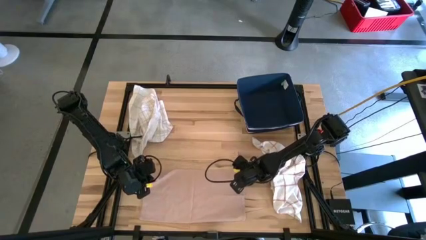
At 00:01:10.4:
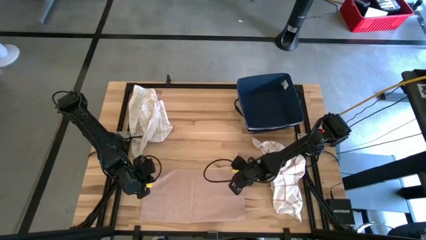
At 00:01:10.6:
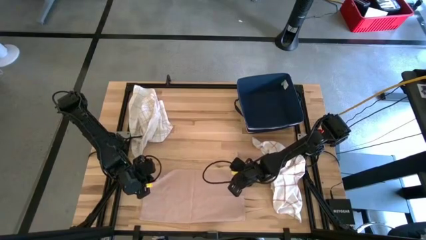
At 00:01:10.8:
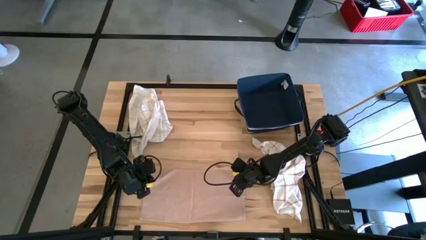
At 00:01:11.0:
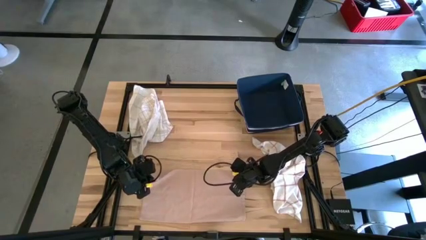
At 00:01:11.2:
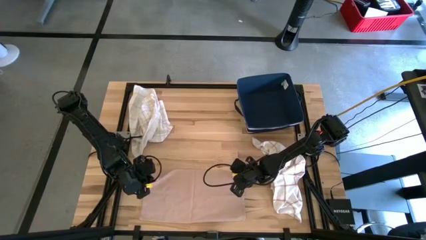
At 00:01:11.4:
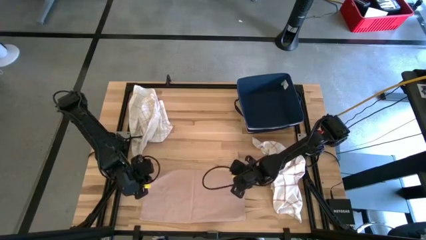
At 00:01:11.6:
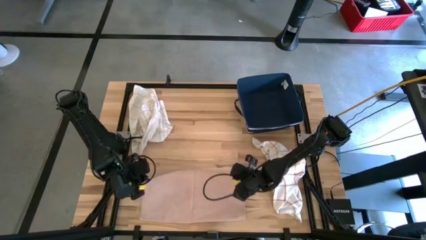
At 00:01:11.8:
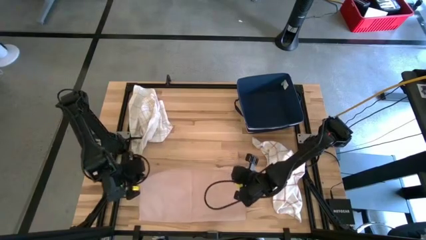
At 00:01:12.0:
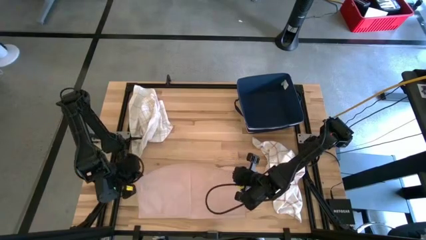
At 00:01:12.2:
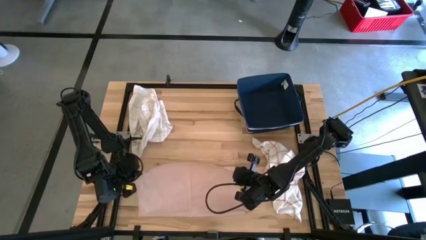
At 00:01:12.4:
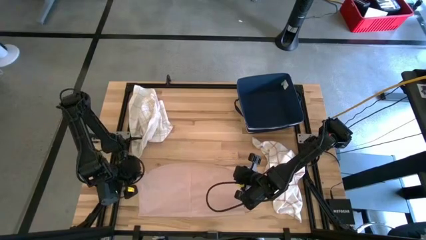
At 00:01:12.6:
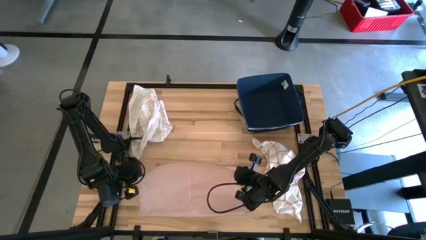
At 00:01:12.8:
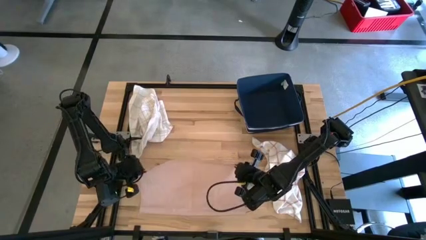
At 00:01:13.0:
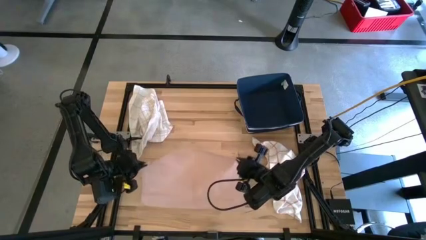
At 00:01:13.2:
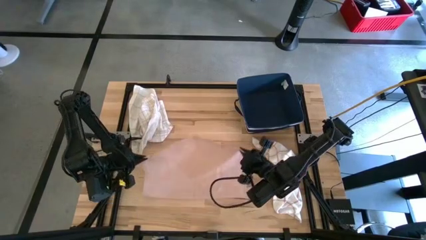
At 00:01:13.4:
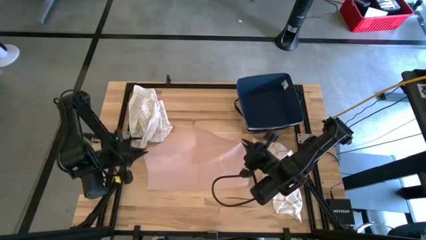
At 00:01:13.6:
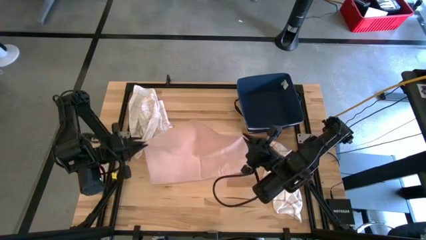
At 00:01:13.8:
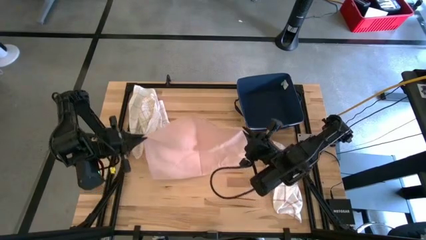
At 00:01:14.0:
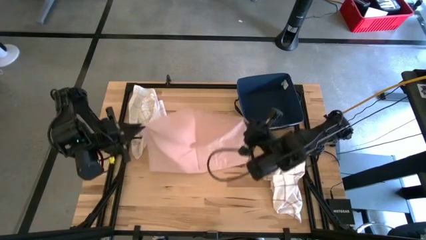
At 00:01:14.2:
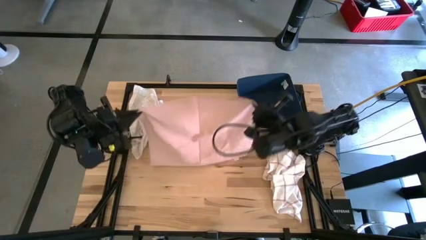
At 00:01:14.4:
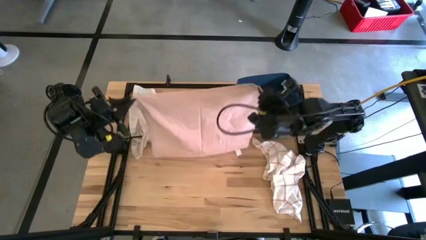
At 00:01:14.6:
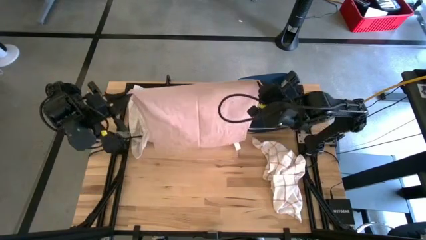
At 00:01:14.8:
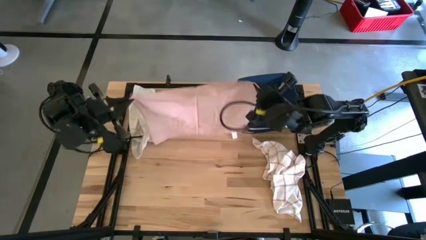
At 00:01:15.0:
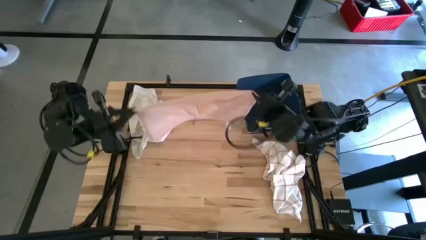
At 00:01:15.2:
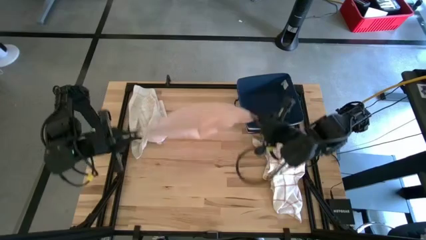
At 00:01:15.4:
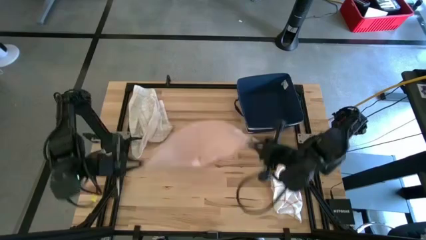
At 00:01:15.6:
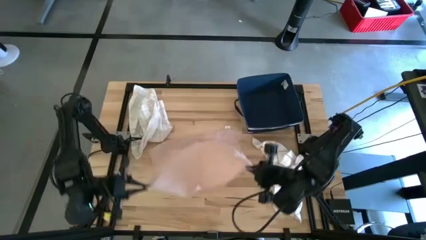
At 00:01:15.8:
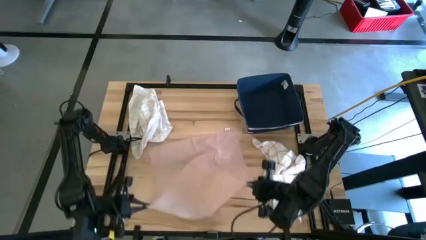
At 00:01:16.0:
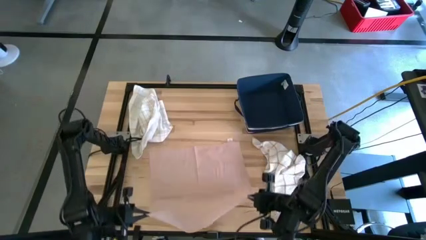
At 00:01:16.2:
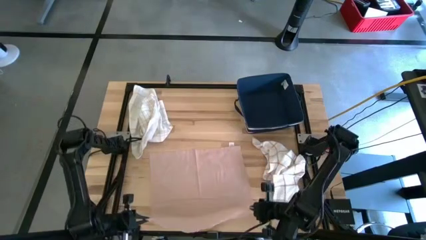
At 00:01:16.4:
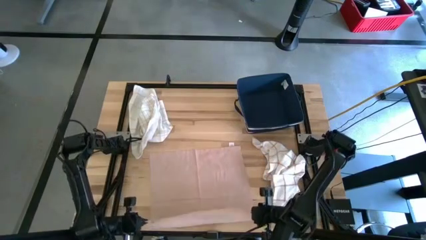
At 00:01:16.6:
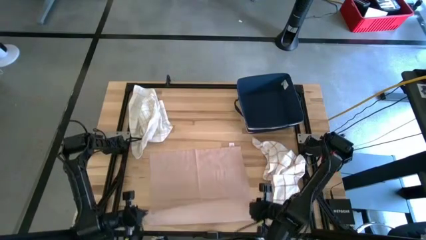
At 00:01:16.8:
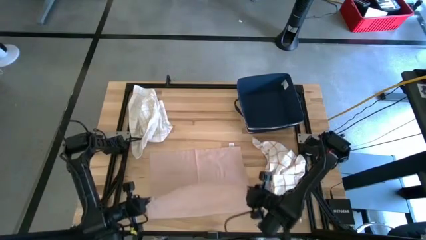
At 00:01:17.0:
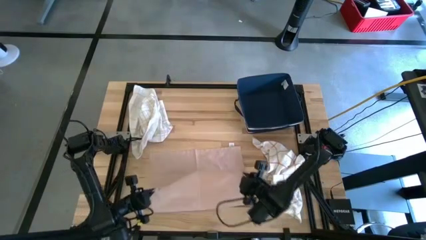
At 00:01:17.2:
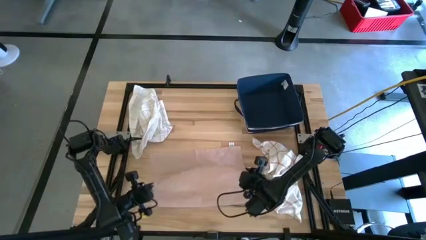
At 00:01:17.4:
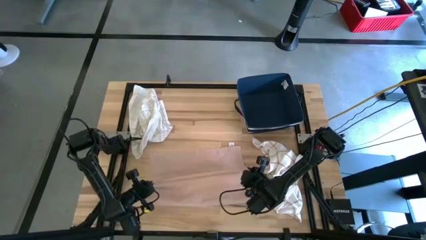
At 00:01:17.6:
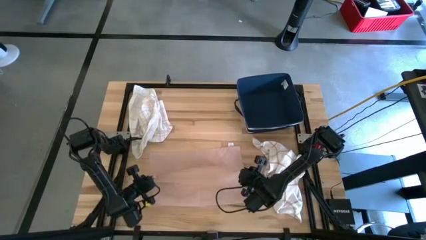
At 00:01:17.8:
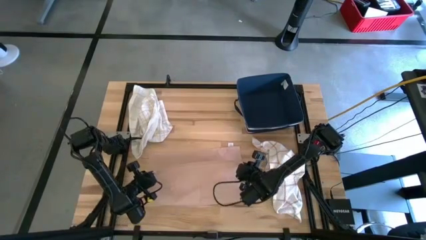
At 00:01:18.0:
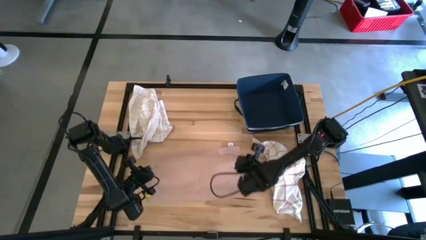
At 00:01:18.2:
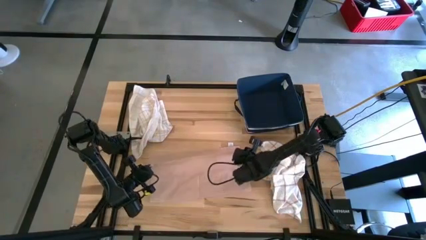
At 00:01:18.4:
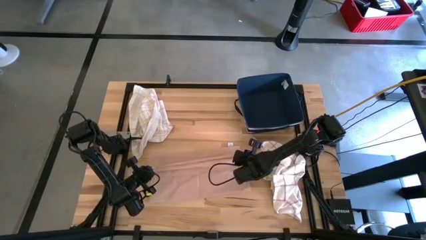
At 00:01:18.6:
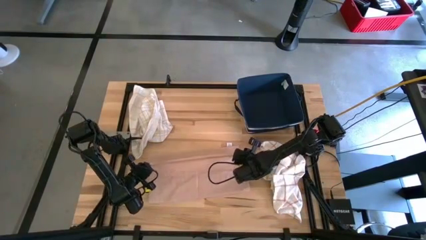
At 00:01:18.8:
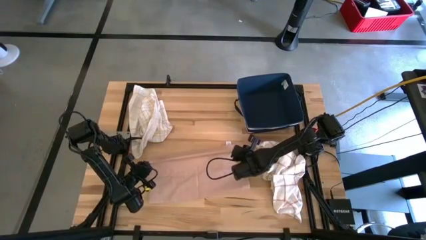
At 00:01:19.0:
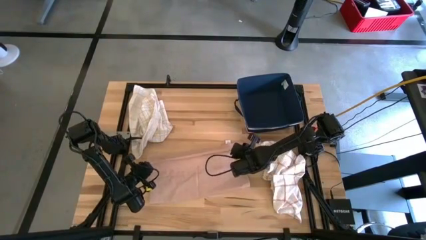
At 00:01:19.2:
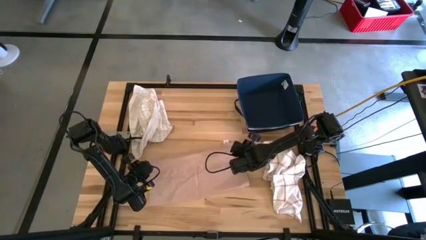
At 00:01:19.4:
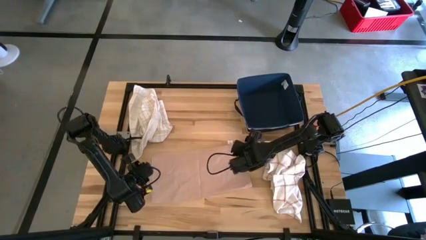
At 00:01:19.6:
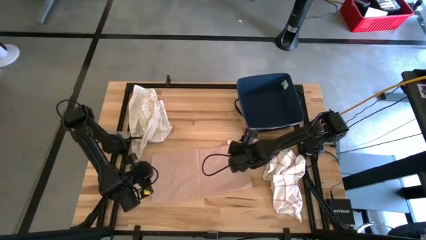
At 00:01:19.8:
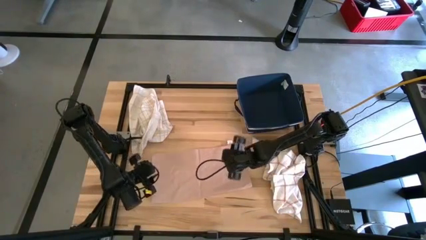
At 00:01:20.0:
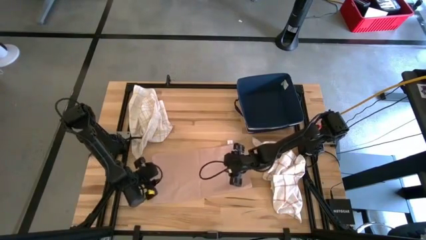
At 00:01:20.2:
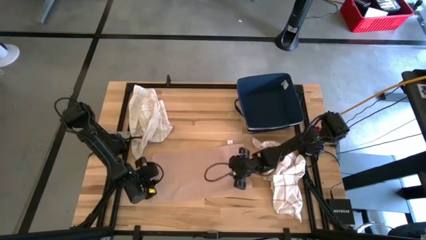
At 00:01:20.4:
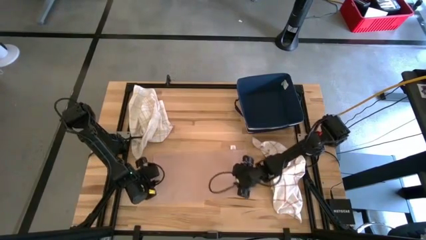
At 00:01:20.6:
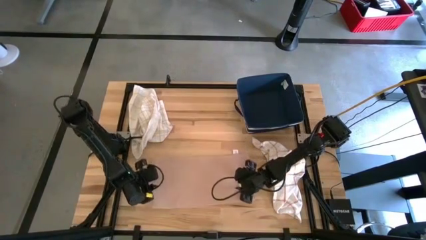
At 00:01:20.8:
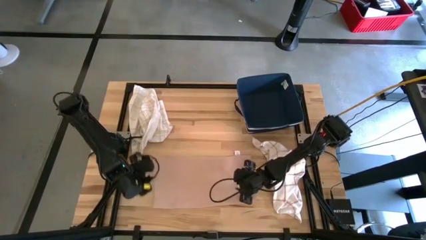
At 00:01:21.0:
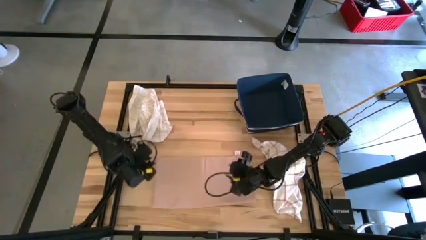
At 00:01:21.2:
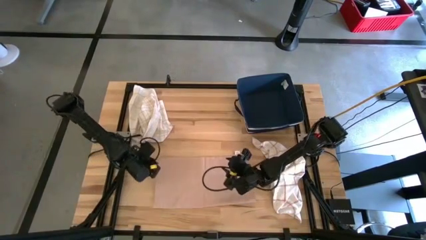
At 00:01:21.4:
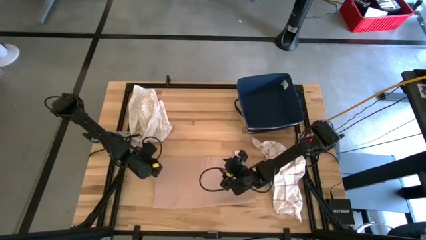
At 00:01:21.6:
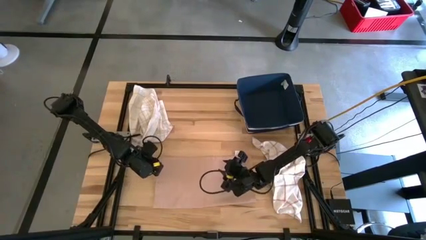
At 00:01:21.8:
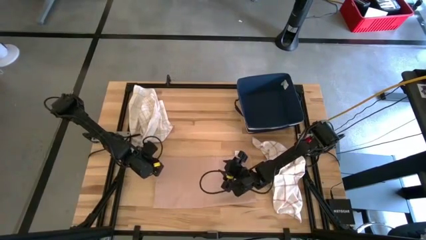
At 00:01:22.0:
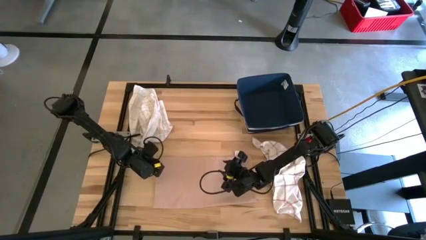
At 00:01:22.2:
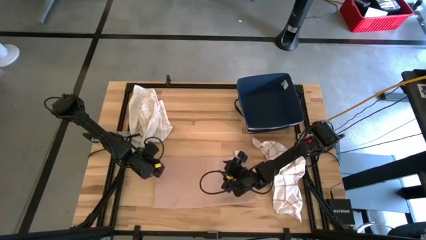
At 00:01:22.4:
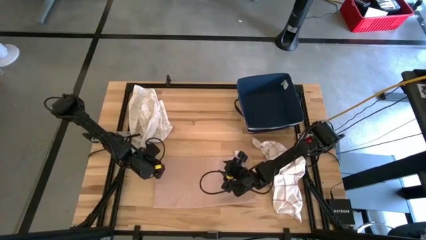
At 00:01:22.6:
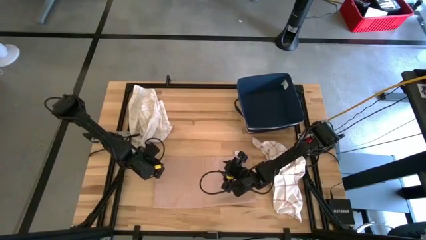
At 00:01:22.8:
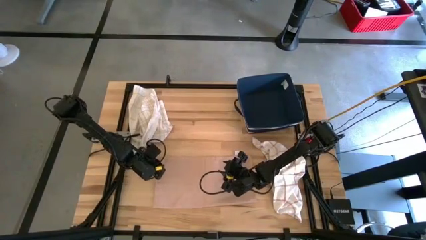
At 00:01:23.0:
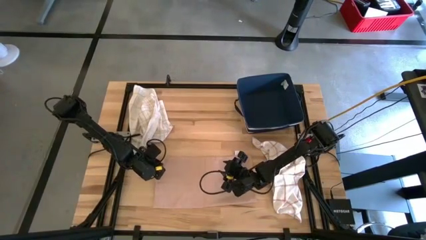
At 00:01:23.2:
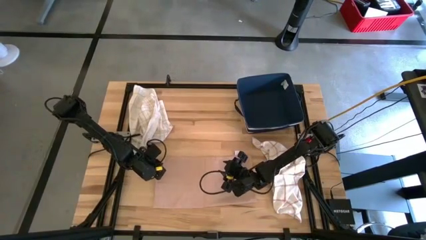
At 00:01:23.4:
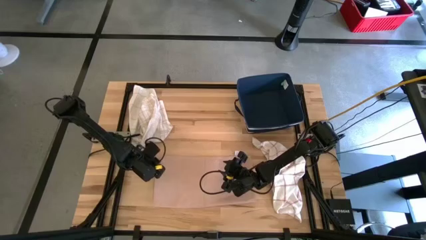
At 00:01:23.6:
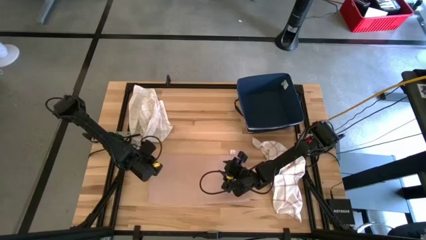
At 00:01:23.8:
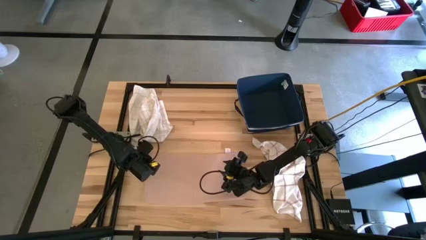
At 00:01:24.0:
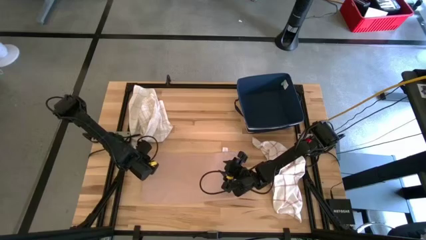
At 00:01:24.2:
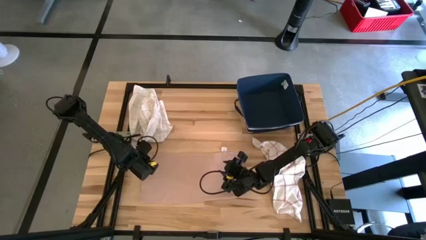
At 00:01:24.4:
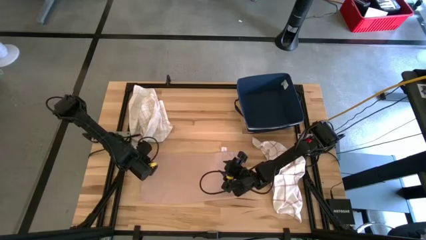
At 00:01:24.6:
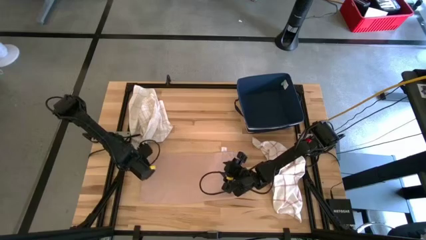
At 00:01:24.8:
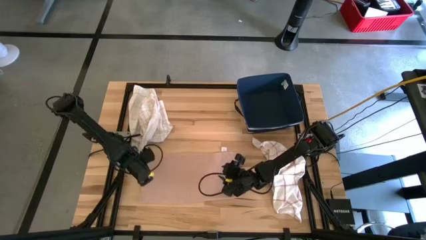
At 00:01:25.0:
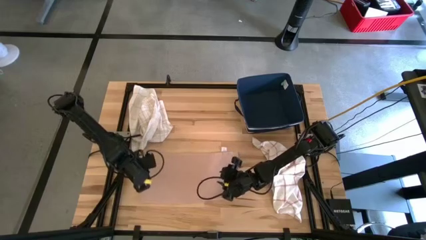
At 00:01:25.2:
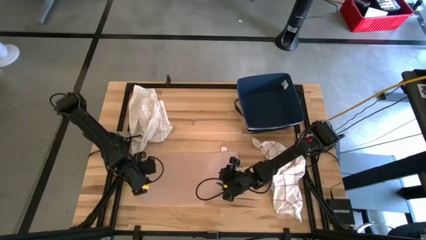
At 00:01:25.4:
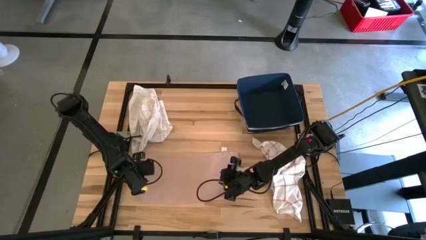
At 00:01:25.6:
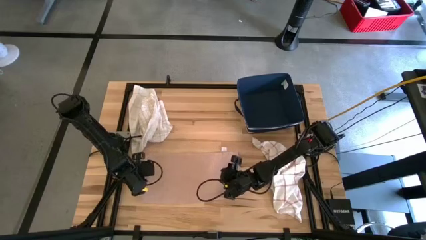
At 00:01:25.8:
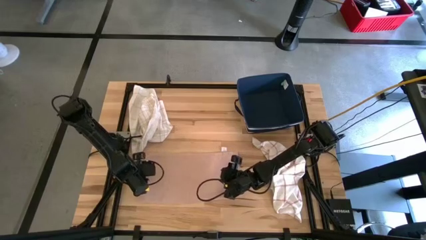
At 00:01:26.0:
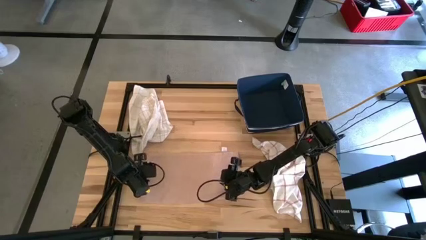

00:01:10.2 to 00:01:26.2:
Task: Fold towel
Fold the pink towel
